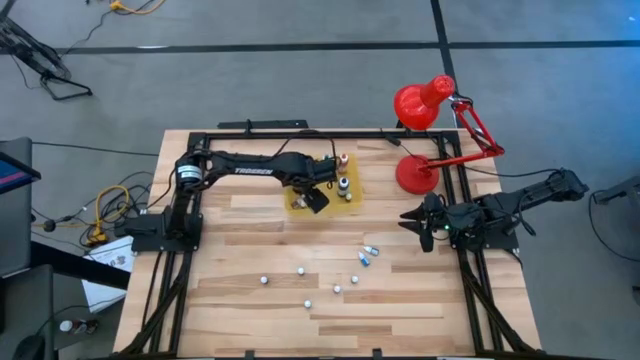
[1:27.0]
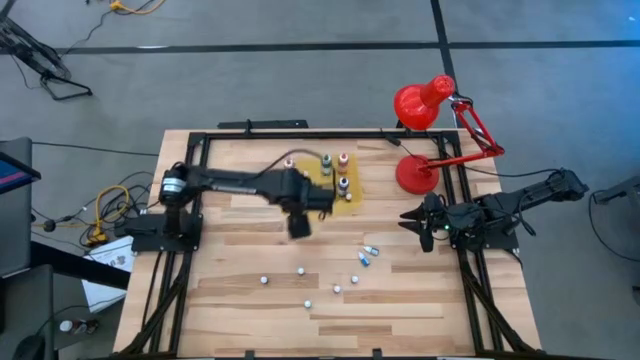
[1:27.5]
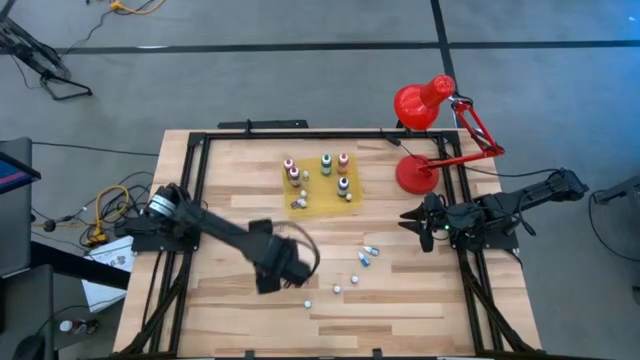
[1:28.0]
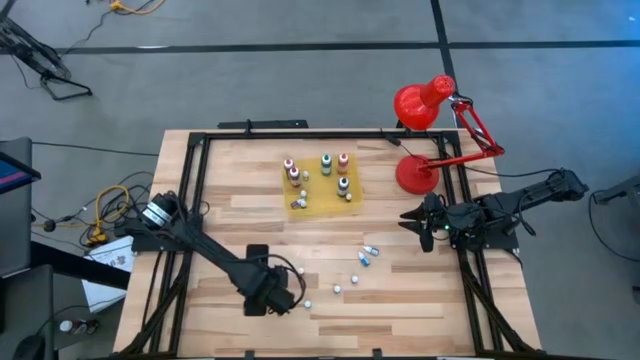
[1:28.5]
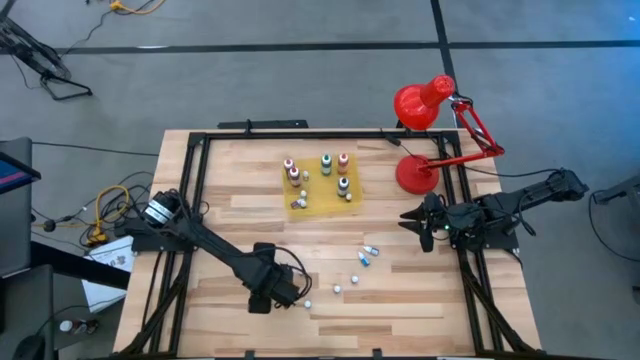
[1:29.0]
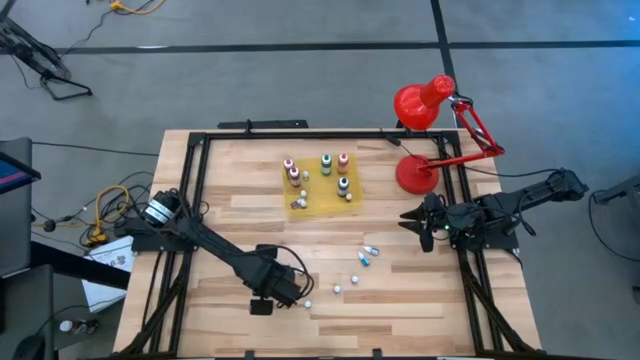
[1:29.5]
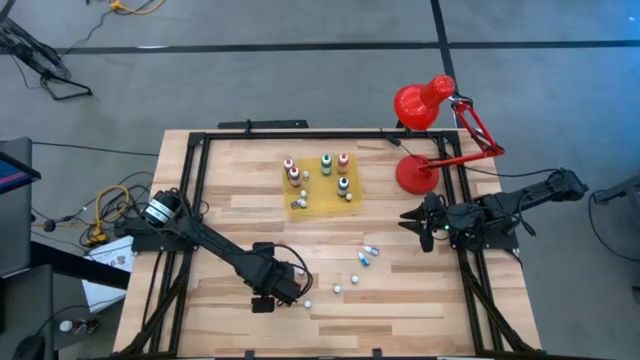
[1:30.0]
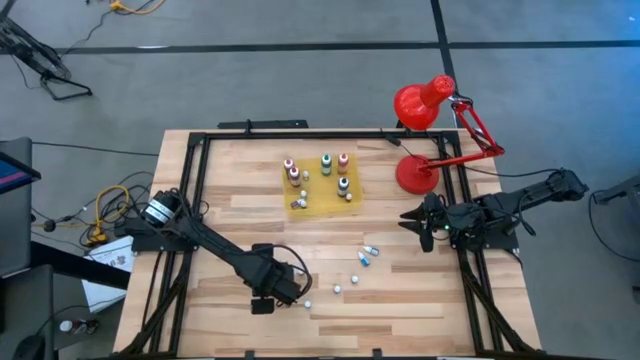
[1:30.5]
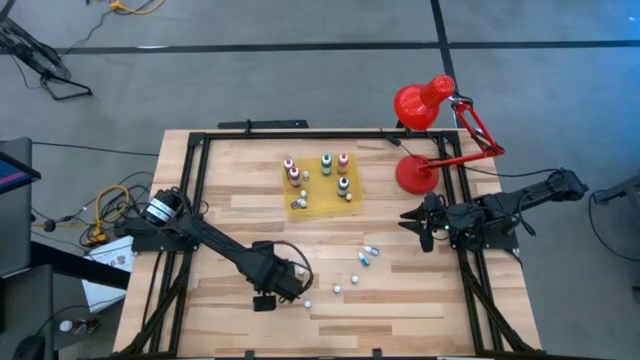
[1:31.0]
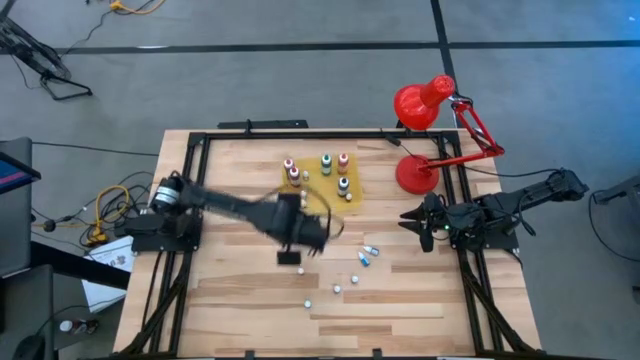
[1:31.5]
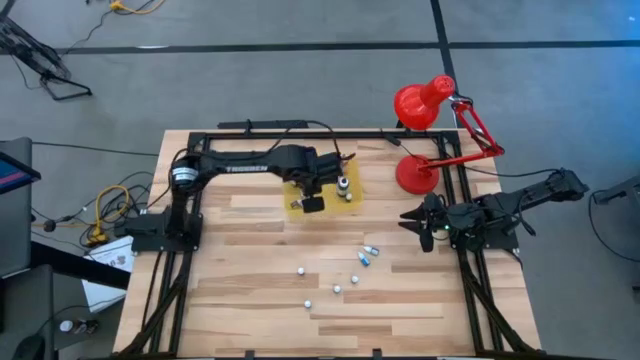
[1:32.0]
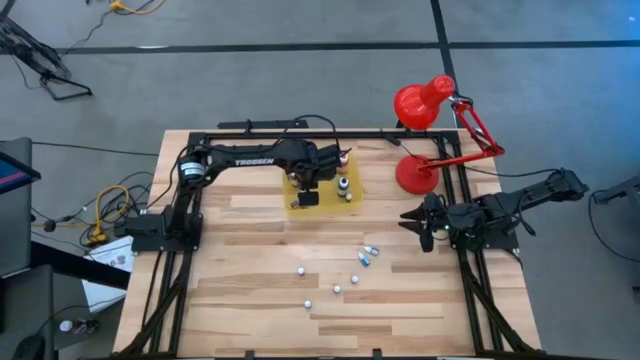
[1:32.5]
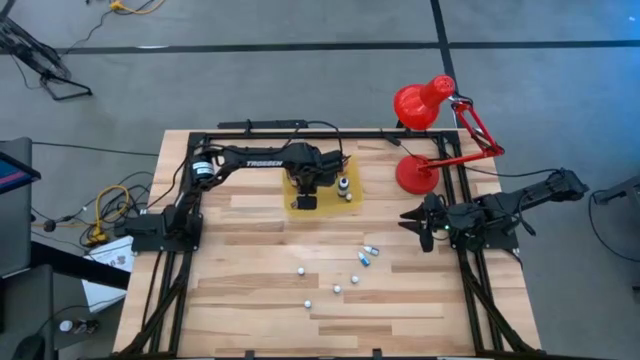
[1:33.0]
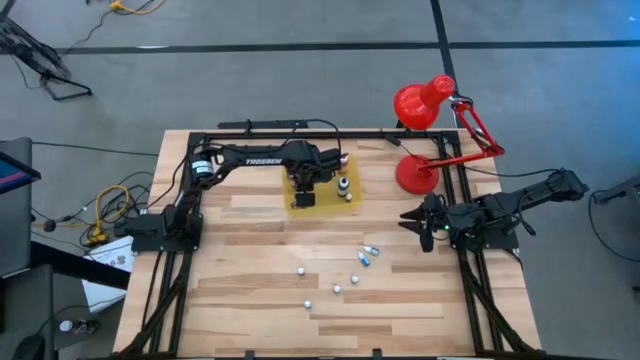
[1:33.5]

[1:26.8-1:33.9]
Task: Pick & Place food coloring
Put the small white food coloring in the bin

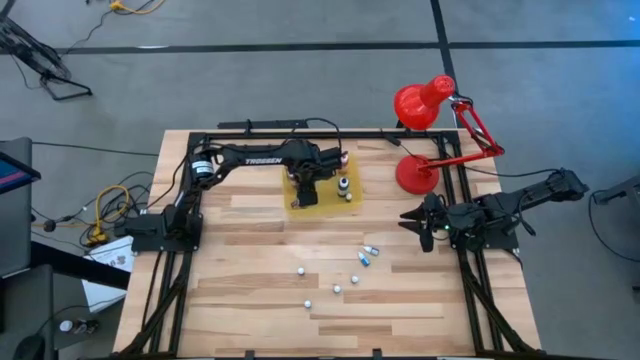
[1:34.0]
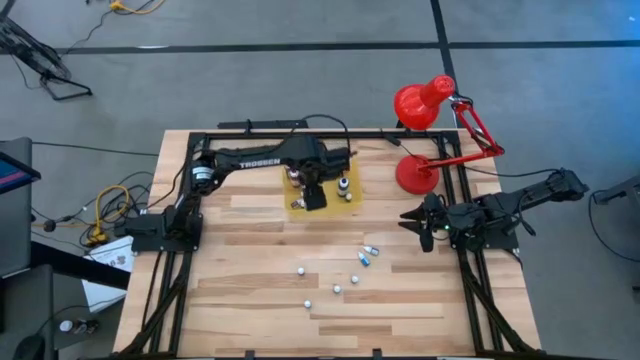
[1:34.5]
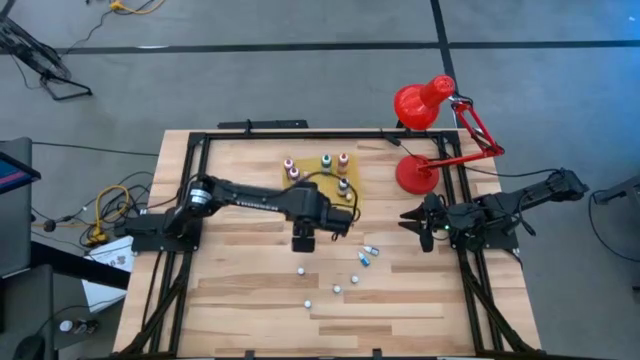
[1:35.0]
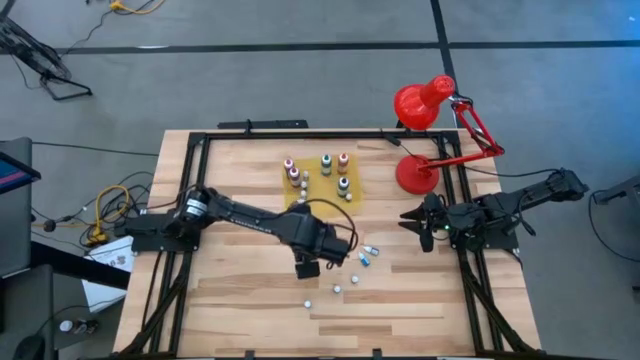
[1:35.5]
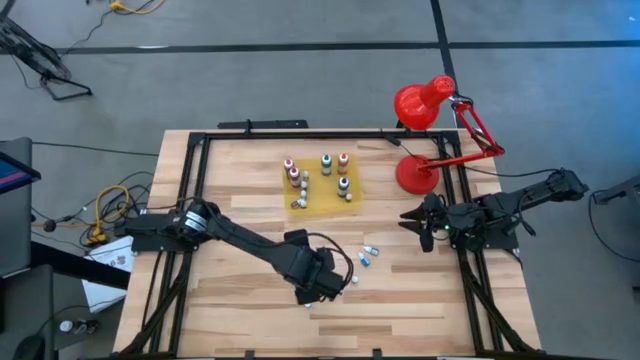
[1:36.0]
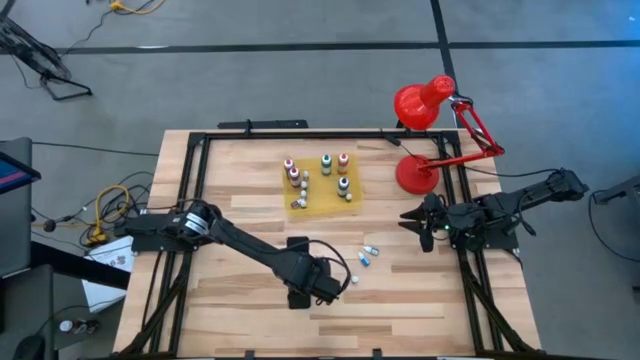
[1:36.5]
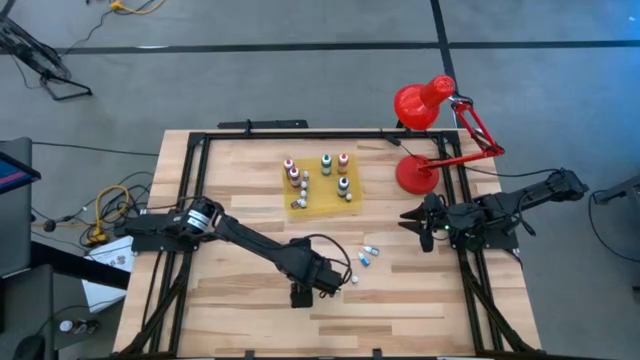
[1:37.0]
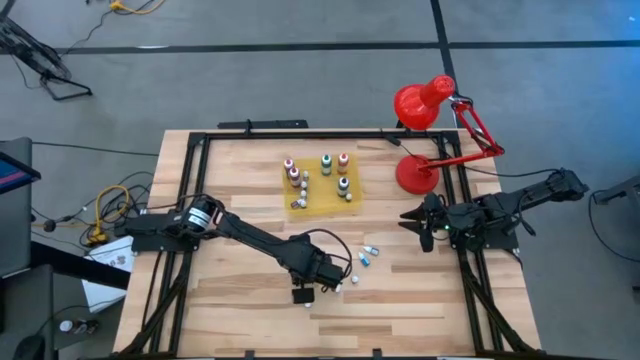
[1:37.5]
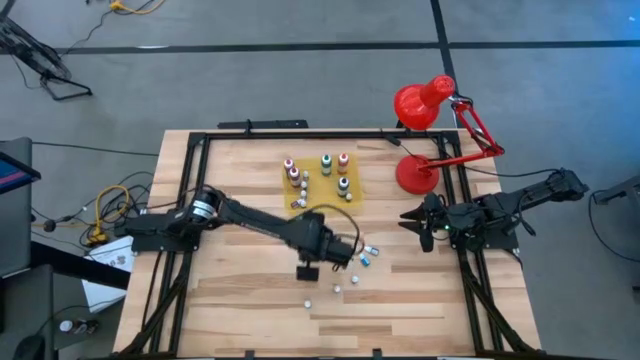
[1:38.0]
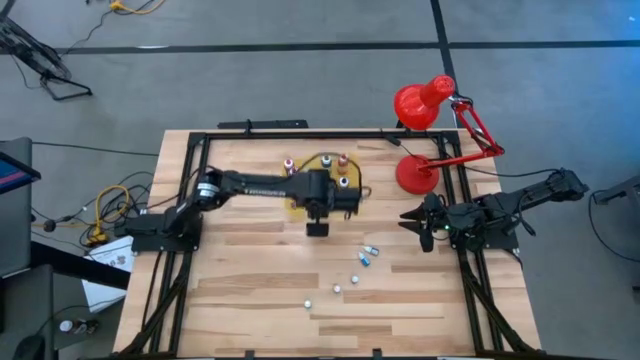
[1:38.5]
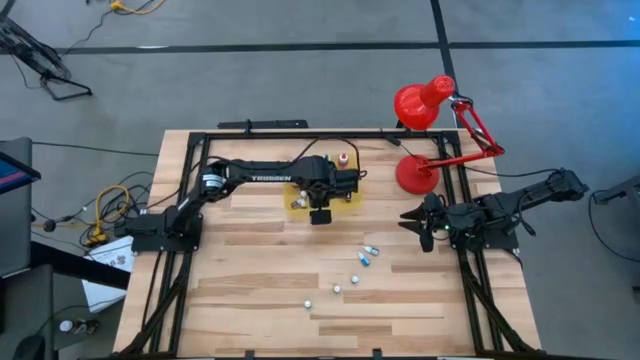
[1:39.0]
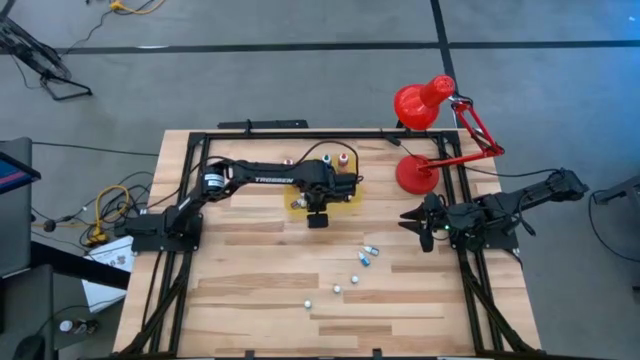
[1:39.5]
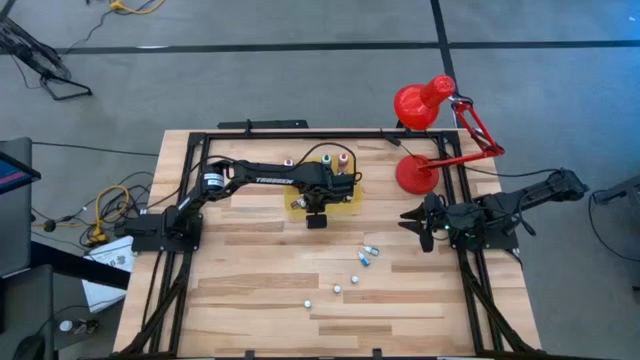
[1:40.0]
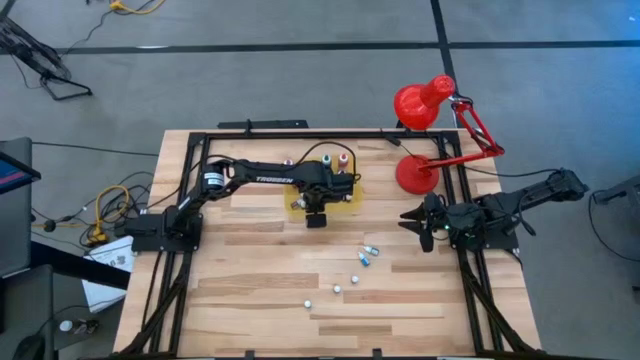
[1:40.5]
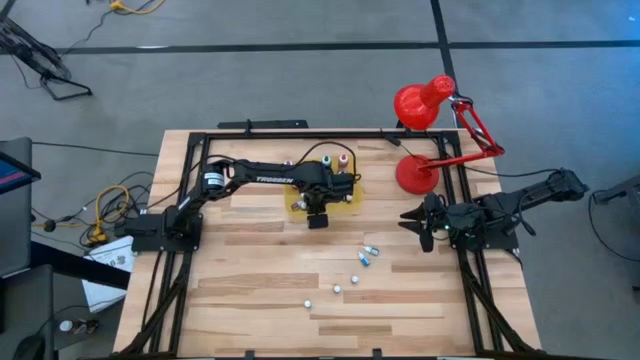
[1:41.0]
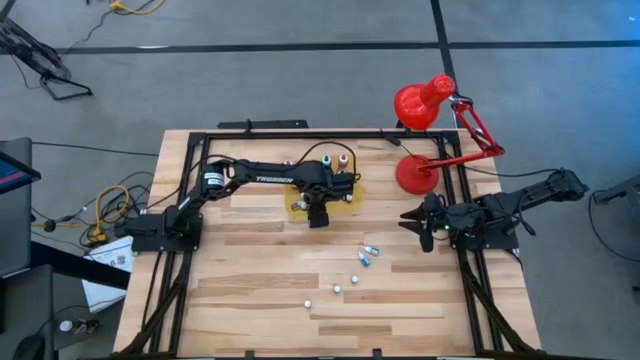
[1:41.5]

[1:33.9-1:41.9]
Put the small white food coloring in the bin

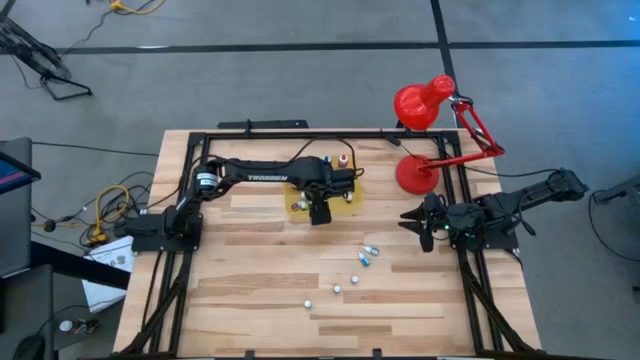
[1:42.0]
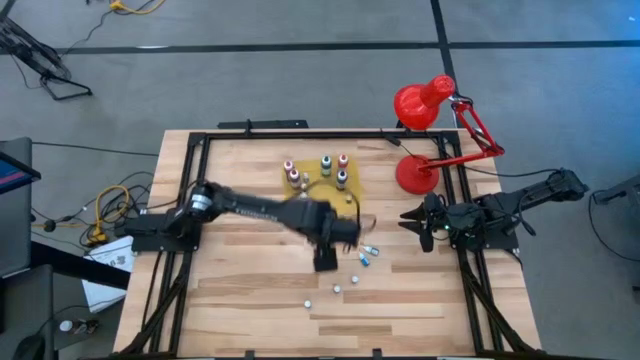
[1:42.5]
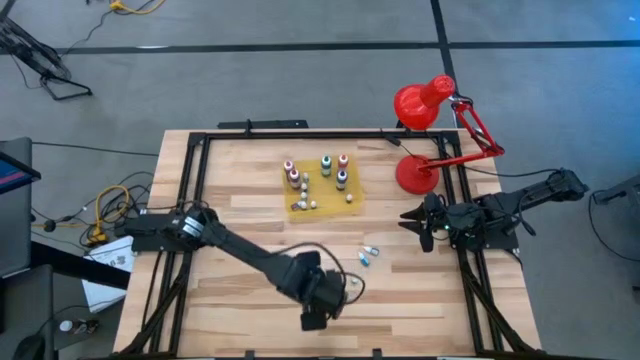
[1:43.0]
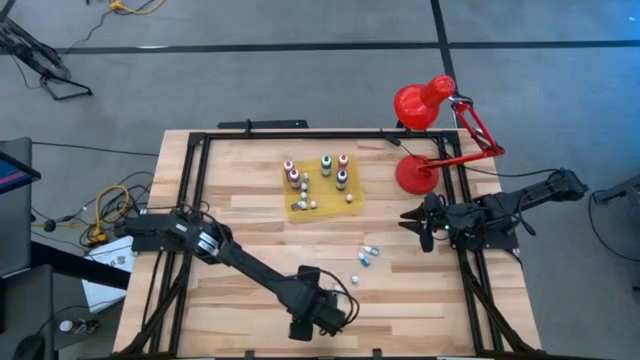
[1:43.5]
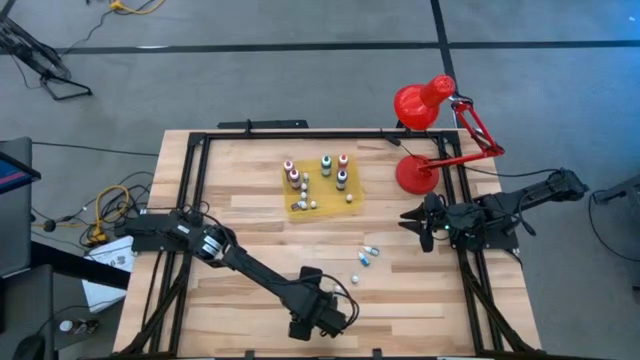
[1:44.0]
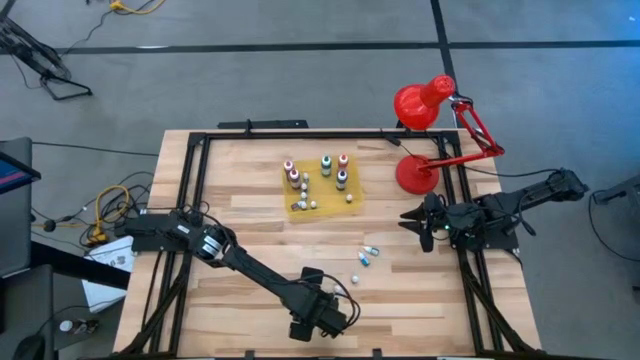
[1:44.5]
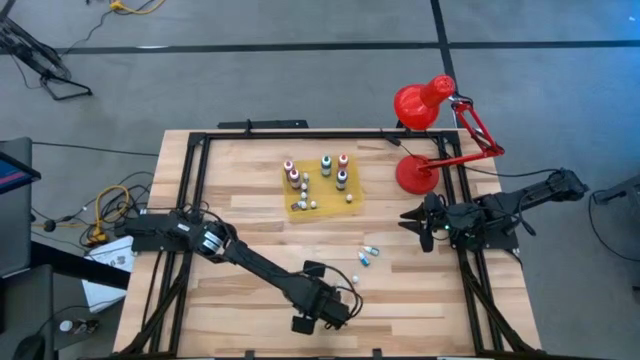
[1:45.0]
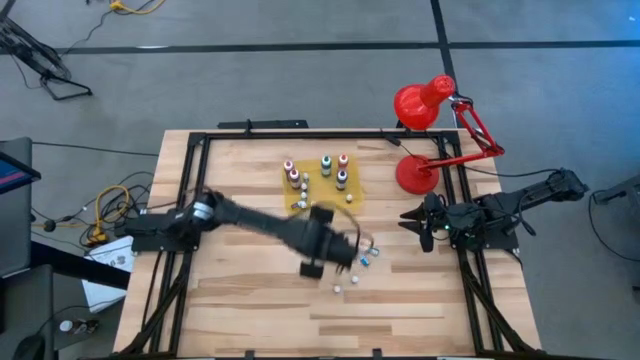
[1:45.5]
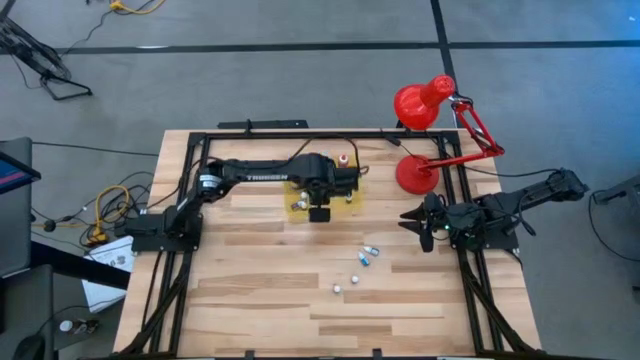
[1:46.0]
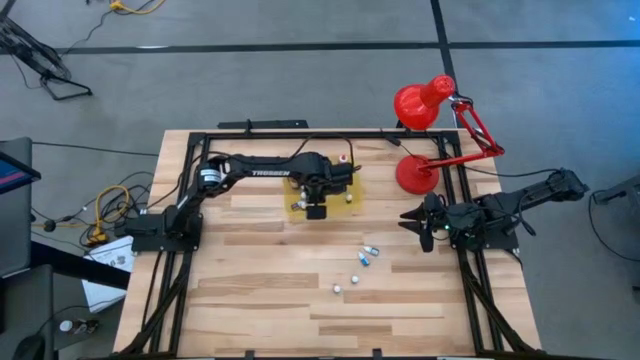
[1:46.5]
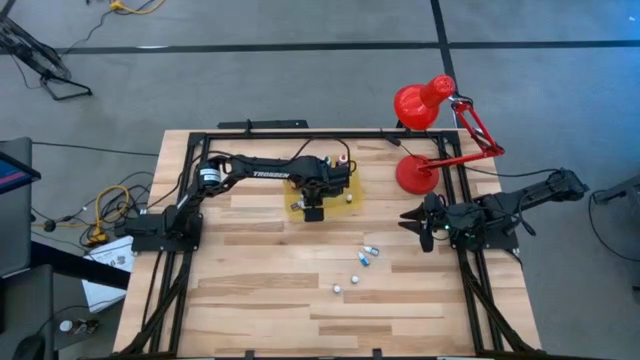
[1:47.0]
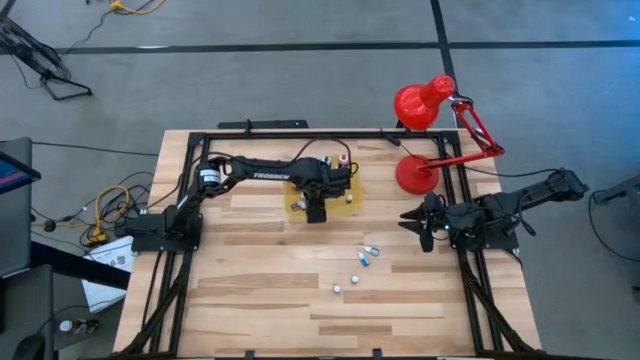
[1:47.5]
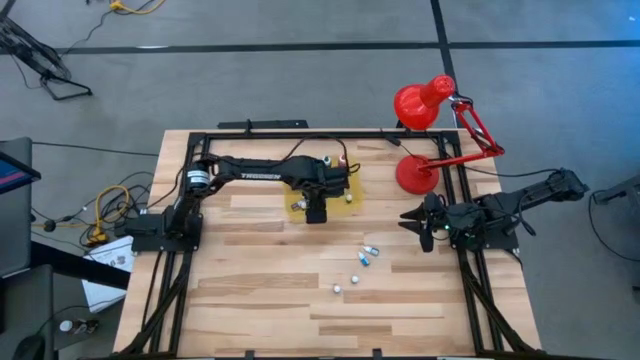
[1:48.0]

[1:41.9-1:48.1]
Put the small white food coloring in the bin
